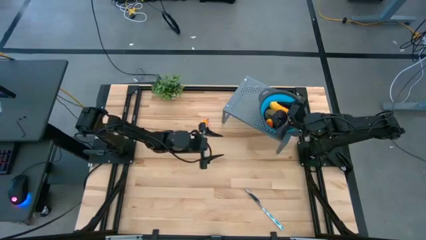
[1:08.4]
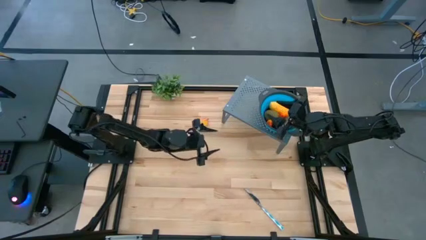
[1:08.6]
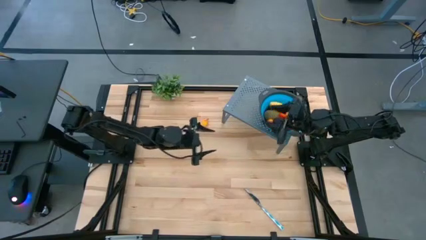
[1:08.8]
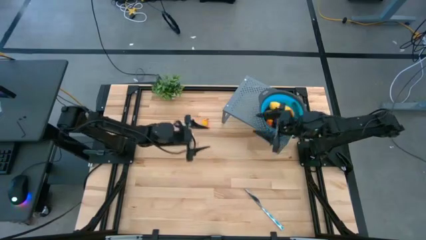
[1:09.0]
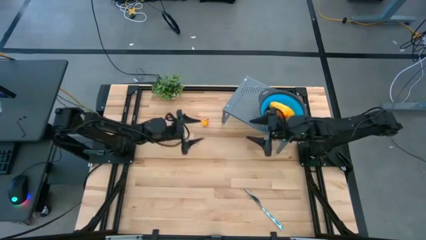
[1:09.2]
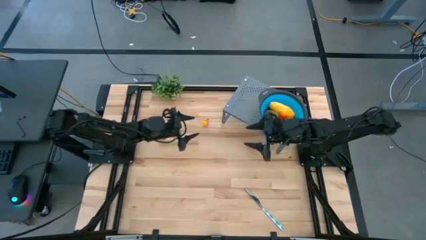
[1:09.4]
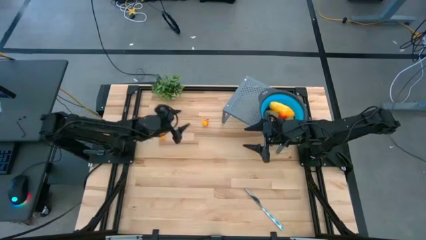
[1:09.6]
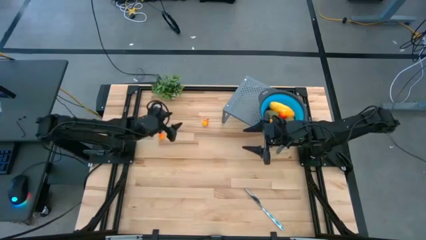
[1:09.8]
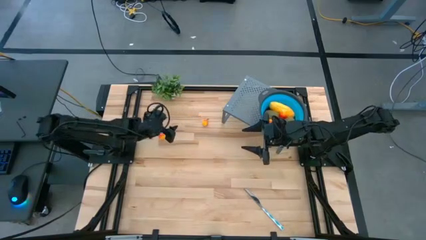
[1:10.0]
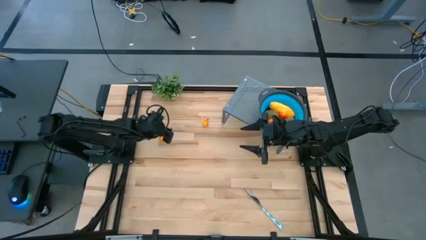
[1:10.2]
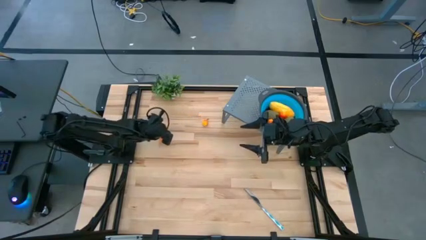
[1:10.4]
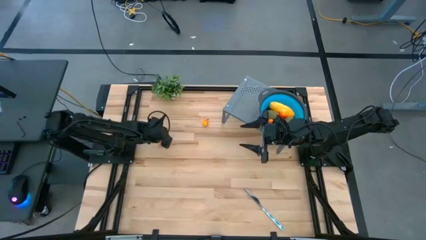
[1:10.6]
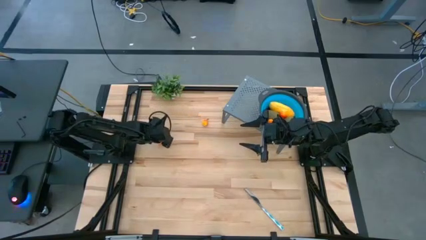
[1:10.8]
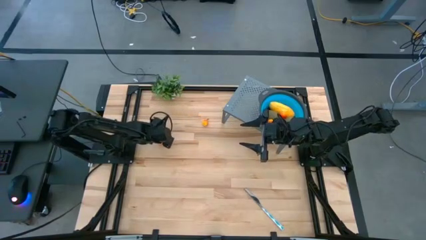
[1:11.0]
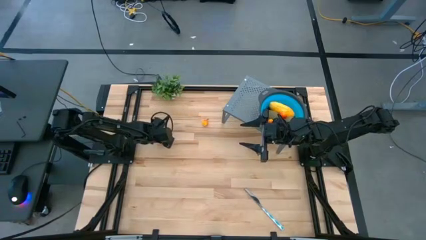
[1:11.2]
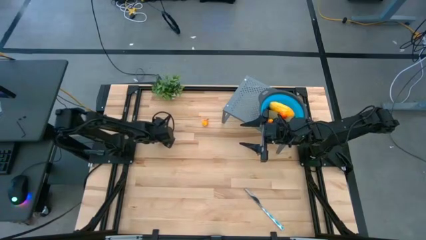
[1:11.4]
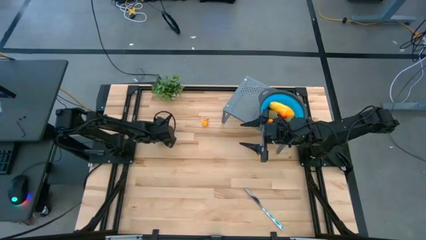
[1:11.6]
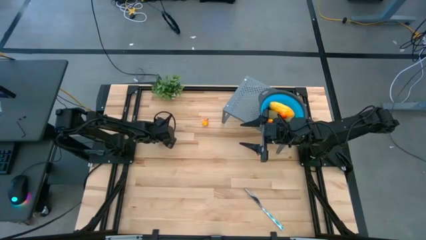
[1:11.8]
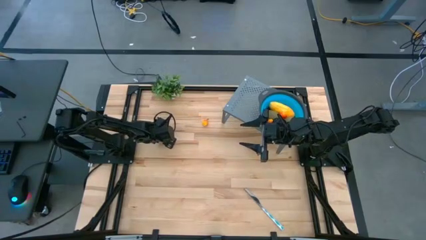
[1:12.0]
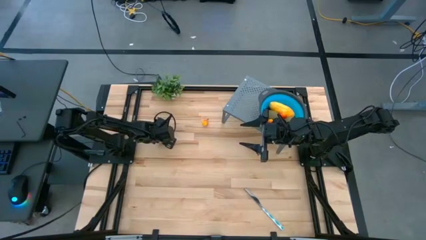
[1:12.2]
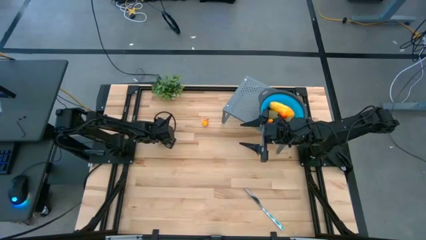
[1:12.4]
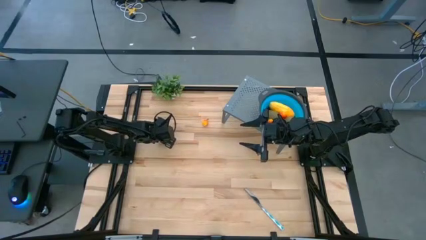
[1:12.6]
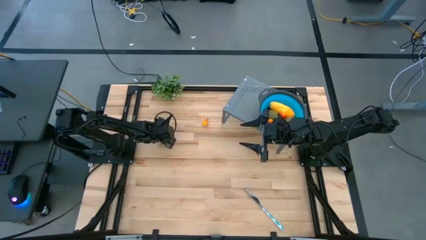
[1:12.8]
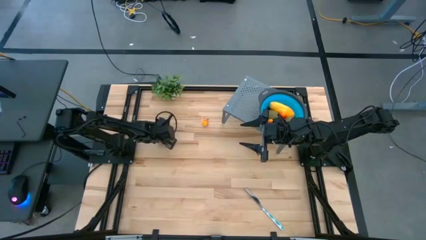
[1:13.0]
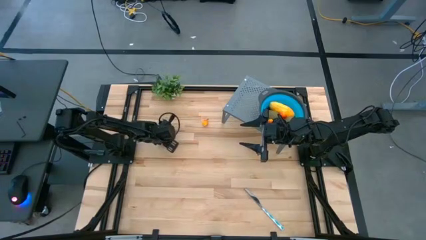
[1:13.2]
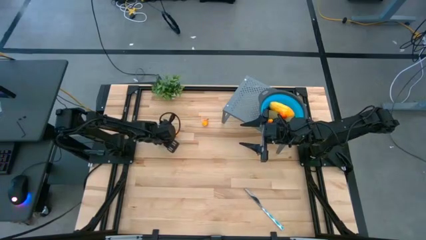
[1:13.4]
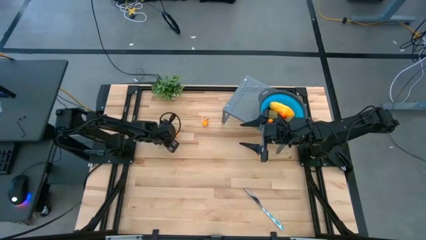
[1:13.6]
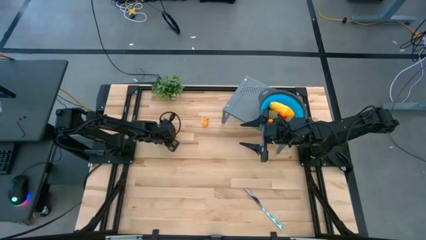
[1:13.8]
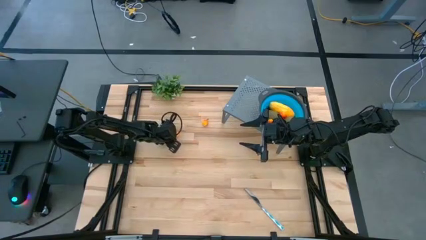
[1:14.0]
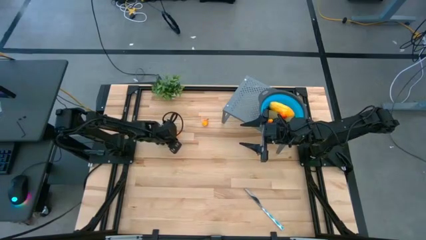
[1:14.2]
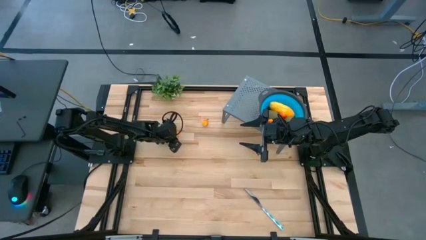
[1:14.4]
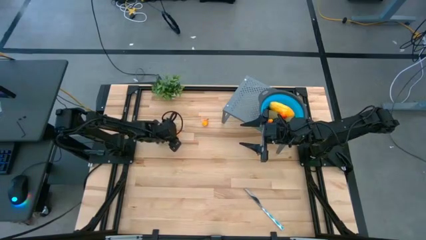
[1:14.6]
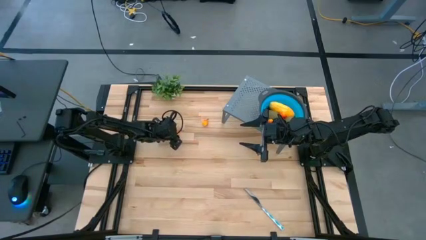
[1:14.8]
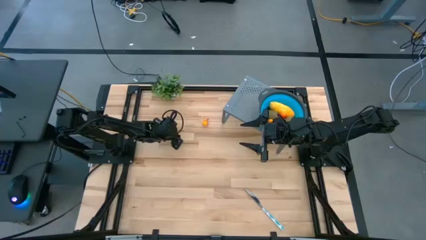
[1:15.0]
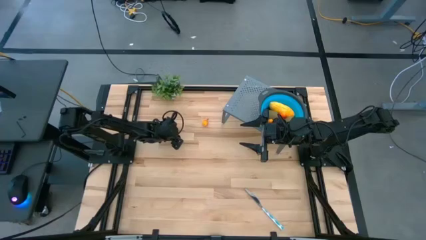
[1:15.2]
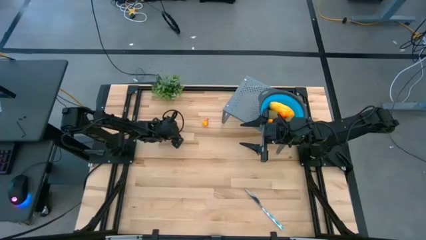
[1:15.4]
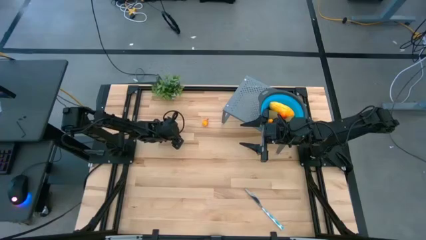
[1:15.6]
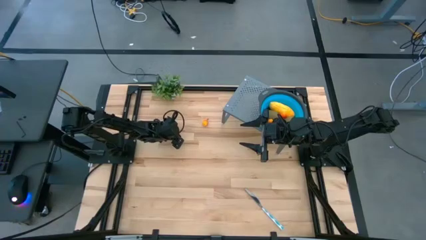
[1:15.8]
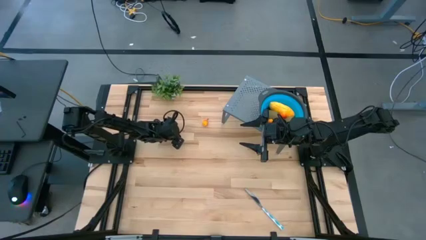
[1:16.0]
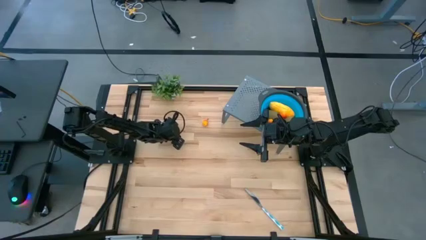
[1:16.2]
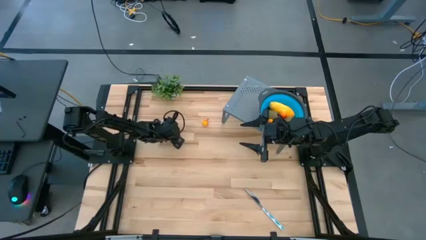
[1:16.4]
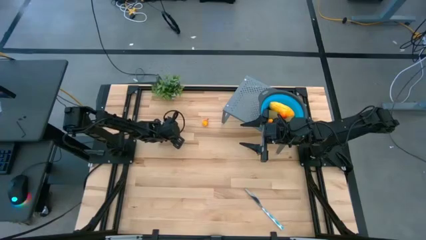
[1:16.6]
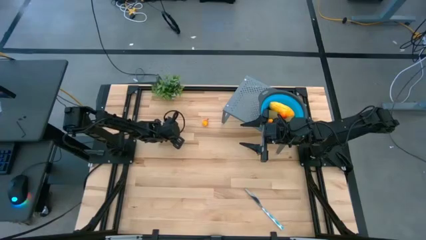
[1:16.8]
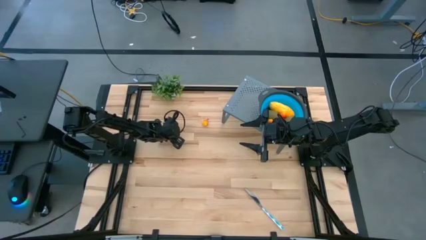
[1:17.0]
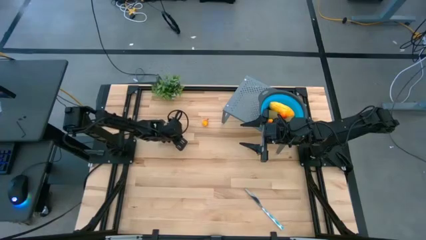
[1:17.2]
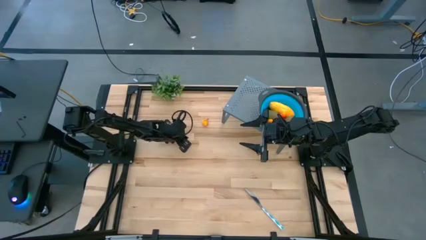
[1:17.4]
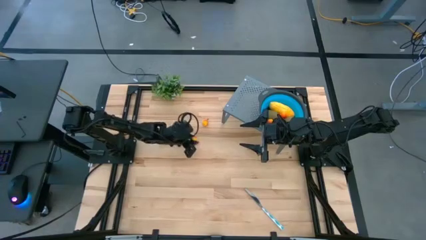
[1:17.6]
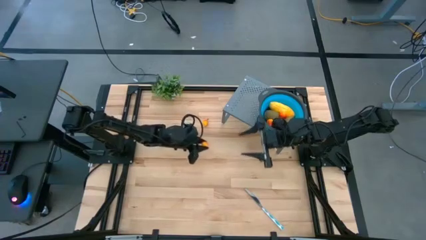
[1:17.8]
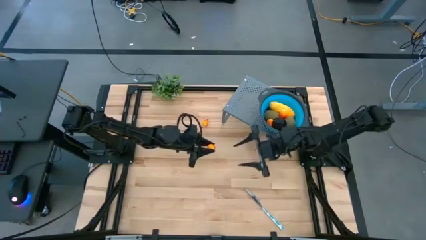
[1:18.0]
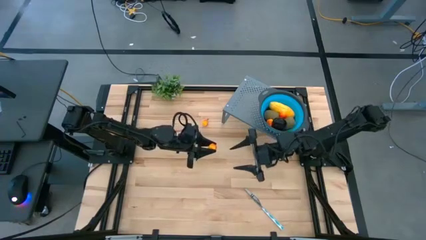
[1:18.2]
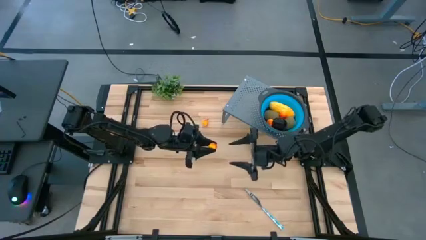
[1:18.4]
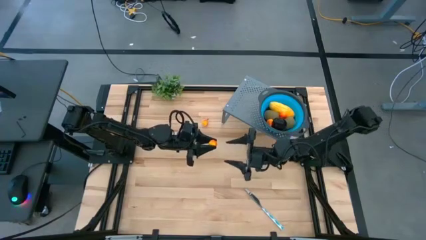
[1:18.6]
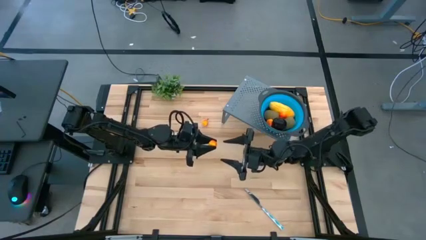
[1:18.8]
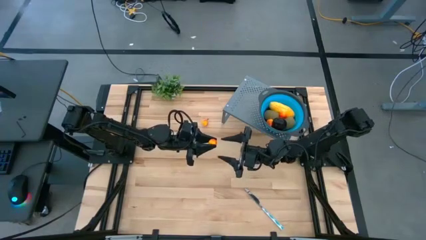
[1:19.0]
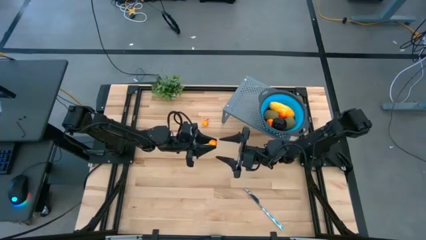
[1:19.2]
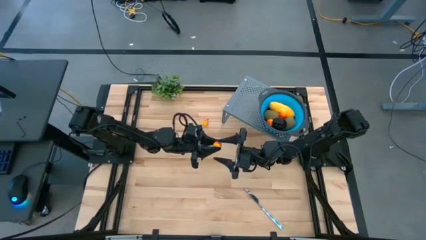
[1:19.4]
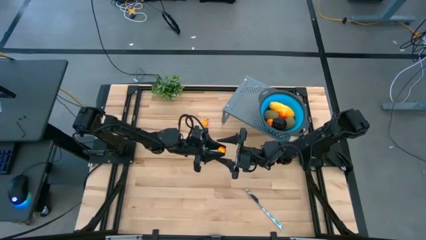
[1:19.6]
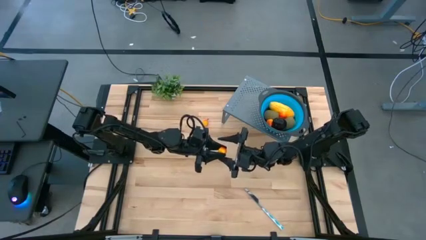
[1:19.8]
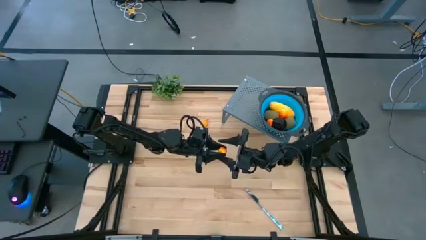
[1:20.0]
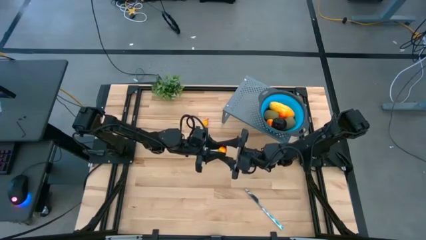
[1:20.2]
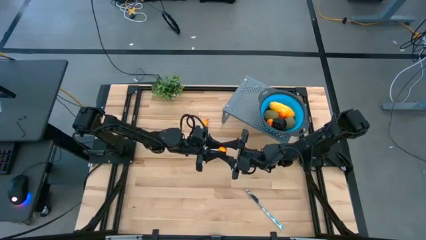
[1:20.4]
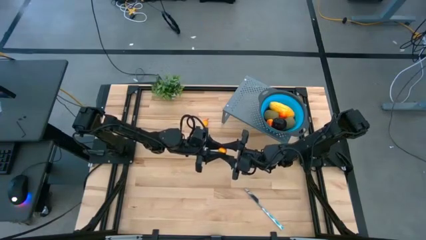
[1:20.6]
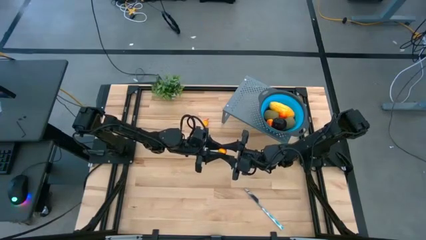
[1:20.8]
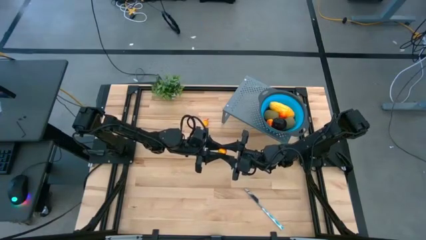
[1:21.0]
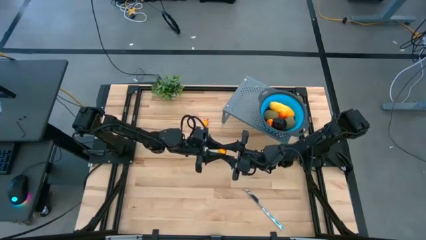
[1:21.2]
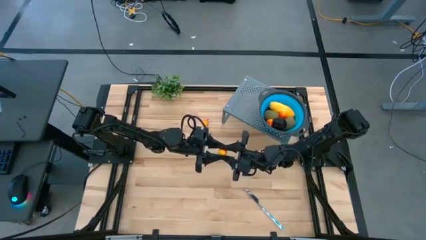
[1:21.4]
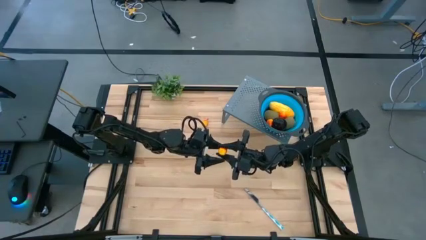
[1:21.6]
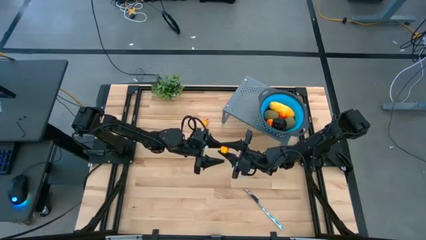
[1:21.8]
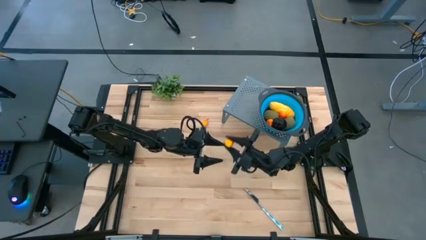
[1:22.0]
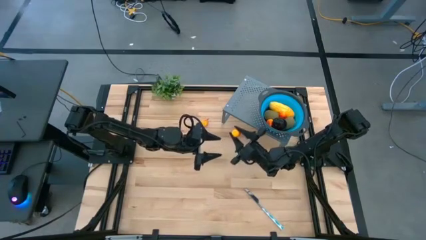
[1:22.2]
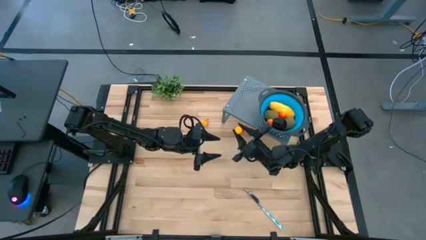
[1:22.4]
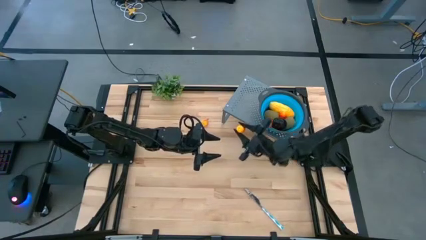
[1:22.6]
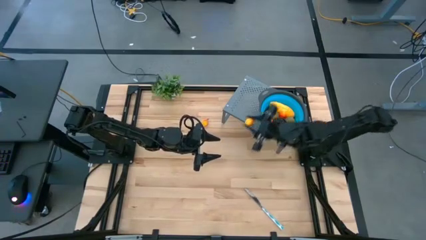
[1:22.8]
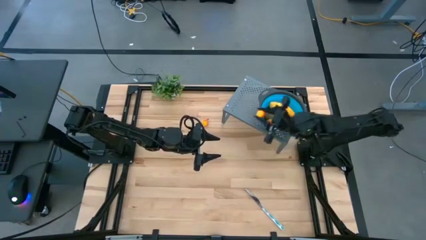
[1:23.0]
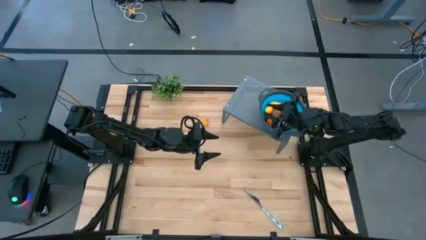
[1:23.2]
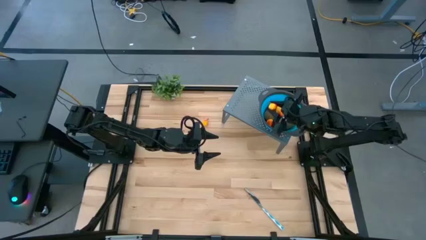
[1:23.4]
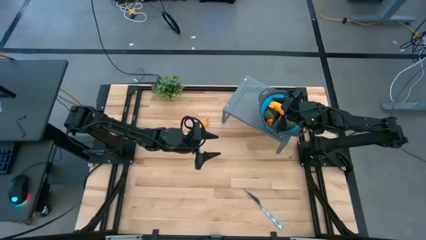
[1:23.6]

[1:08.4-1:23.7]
Task: Pick & Place Fruit
Put the pear into the strainer bowl on the shelf
